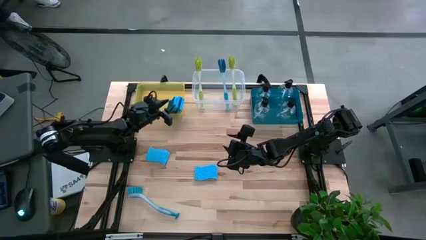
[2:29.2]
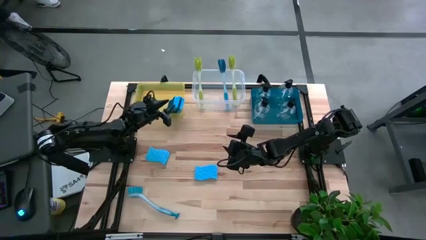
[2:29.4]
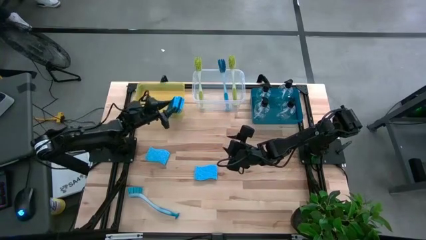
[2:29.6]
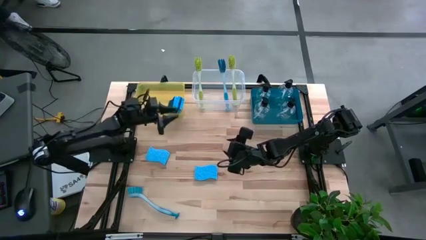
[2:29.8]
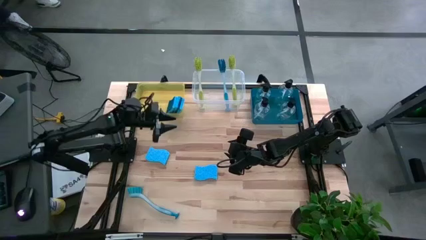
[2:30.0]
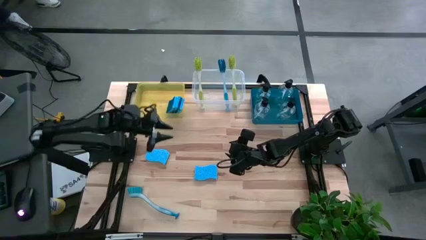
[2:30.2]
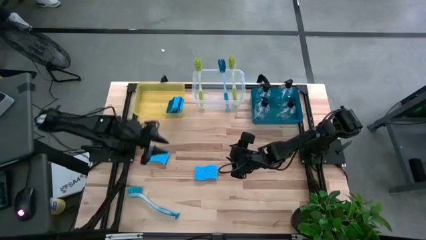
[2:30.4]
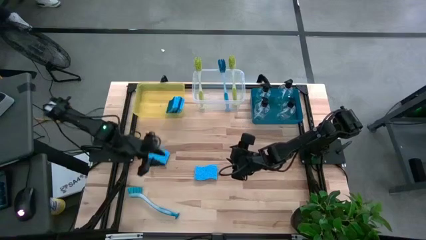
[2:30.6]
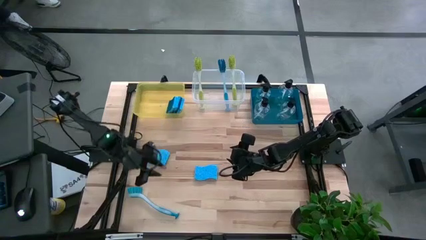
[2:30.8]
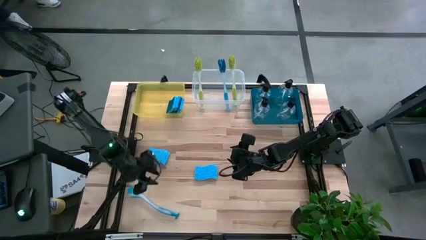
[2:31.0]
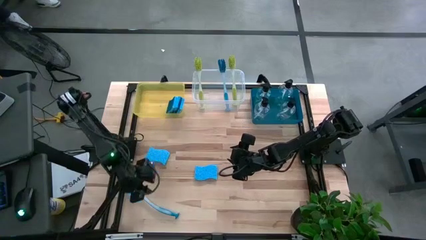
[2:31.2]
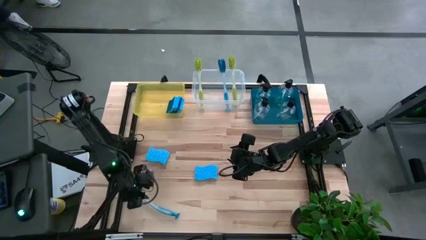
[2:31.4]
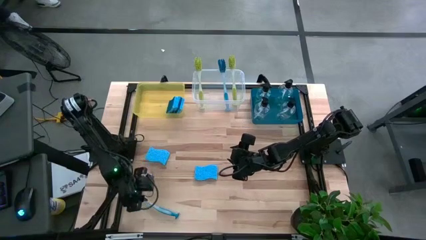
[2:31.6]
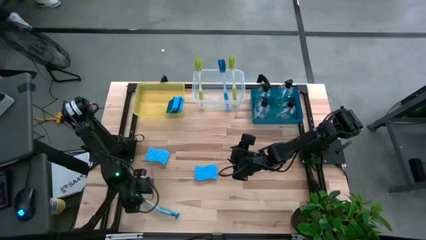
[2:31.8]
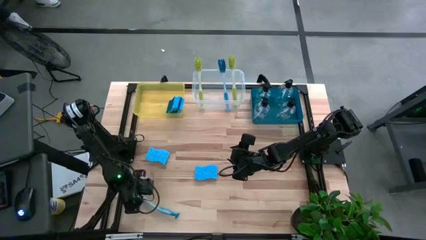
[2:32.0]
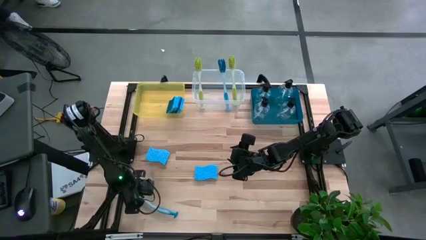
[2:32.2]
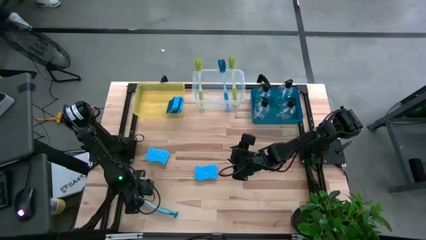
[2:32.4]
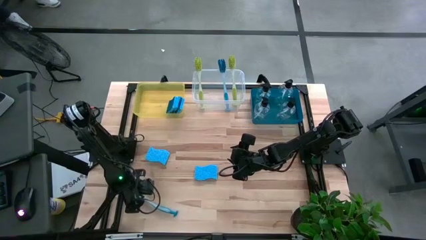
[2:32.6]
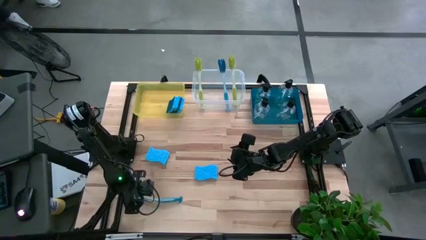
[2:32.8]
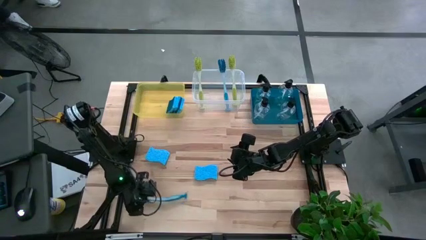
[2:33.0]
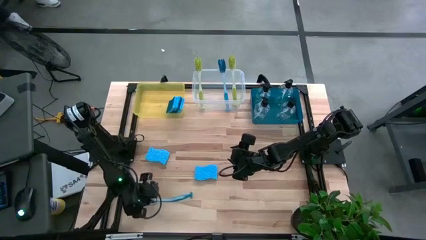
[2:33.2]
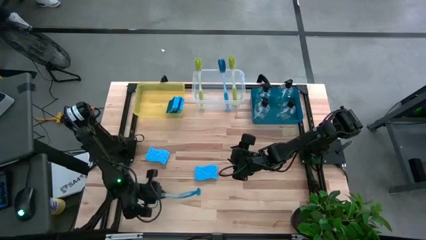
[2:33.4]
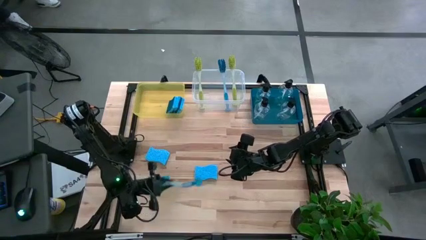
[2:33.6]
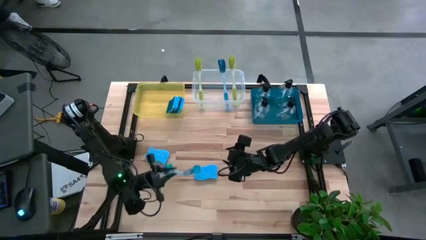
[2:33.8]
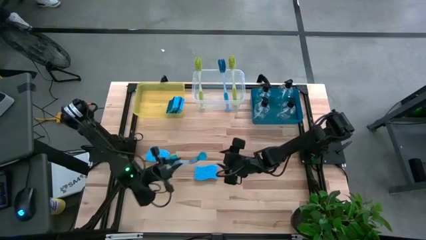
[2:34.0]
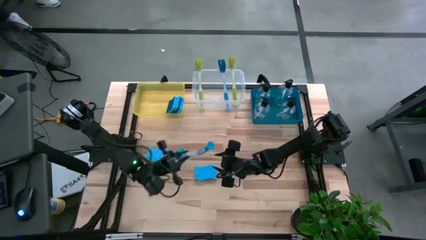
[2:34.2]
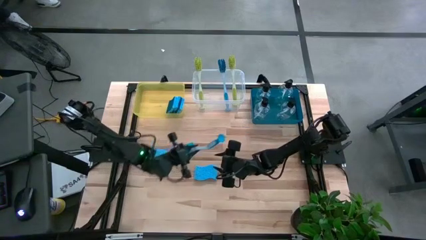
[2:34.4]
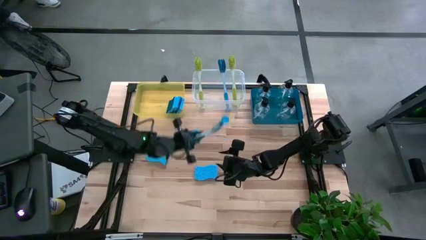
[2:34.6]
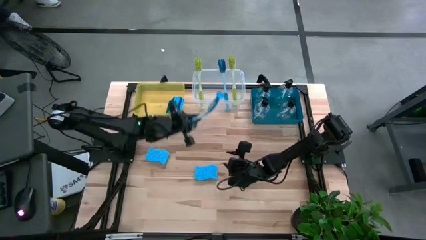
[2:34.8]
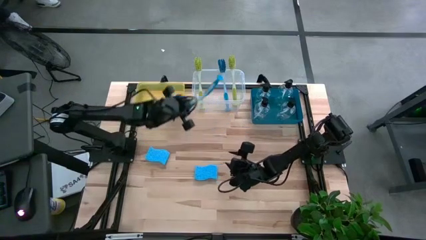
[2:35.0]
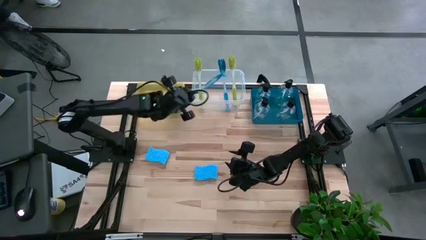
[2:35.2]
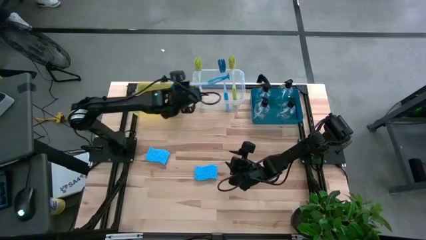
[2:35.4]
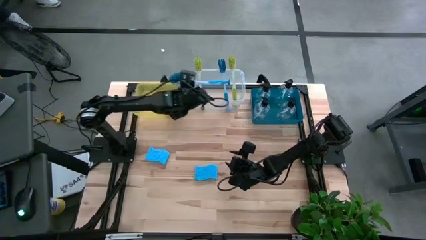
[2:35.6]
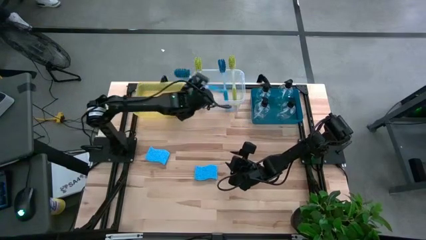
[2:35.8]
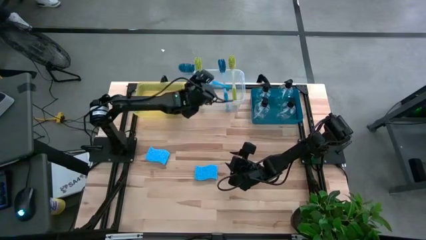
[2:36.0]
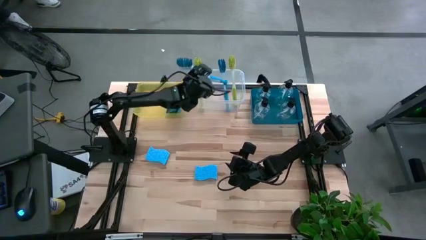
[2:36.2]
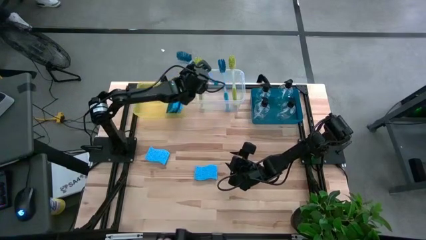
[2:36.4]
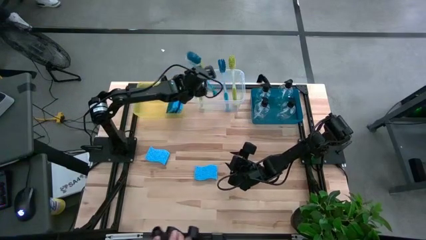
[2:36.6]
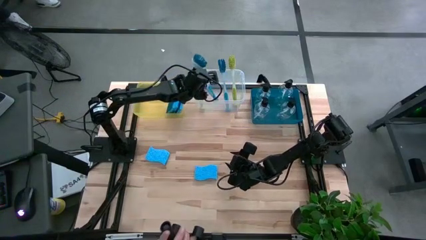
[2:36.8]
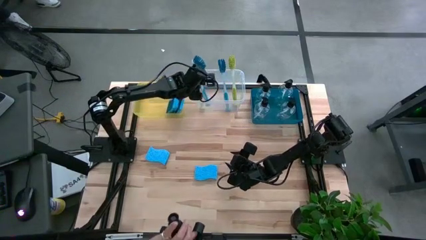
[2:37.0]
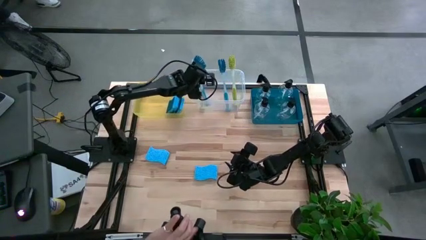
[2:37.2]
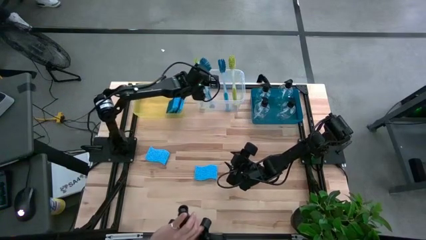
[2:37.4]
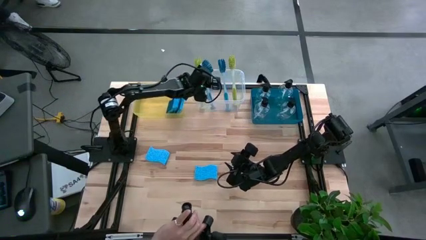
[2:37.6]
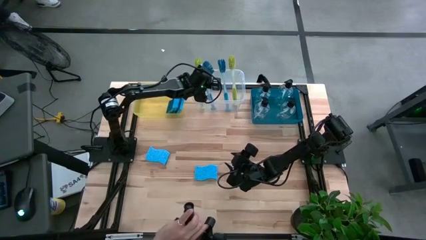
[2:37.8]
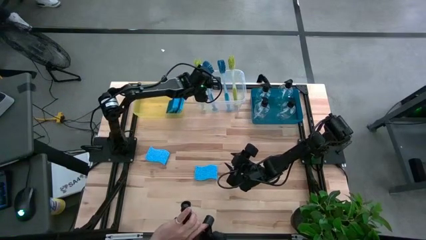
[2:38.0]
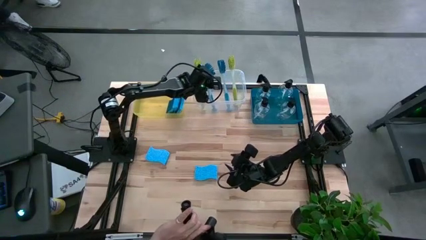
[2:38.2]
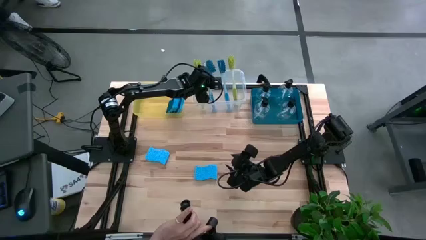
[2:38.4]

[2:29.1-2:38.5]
Task: Pick & Place Kitchen Sink Supplies
Put the blue dish brush into the transparent container

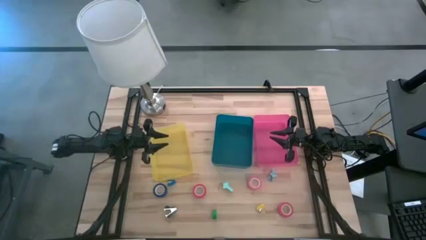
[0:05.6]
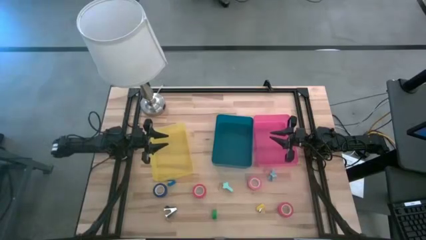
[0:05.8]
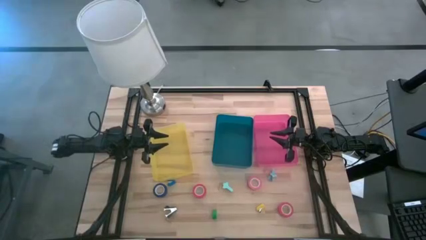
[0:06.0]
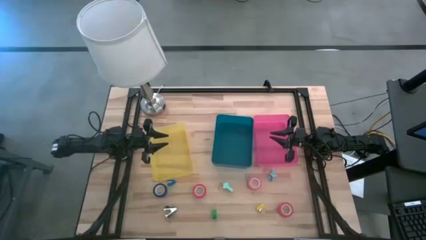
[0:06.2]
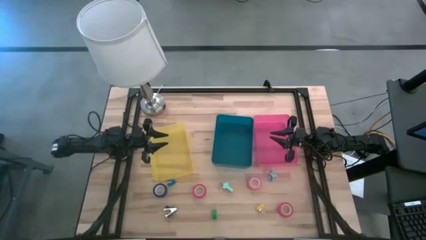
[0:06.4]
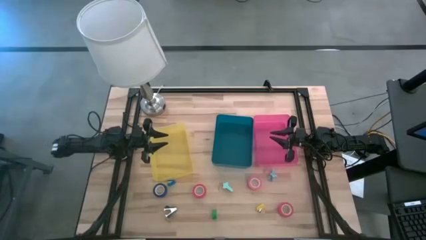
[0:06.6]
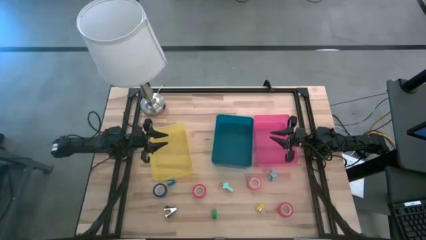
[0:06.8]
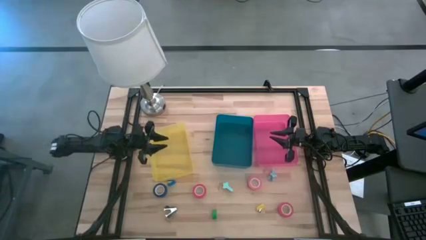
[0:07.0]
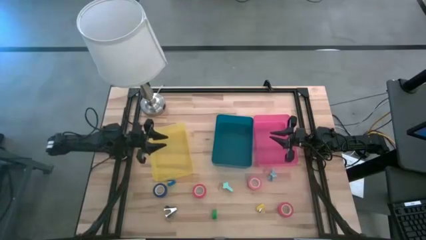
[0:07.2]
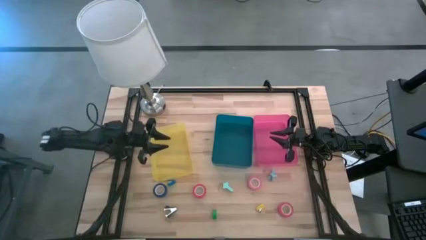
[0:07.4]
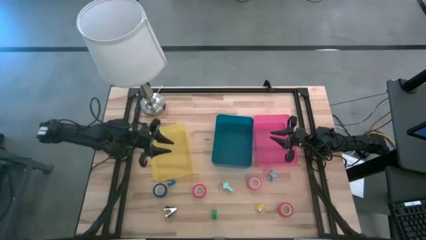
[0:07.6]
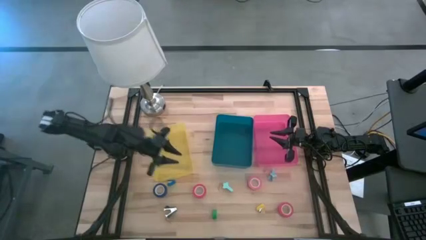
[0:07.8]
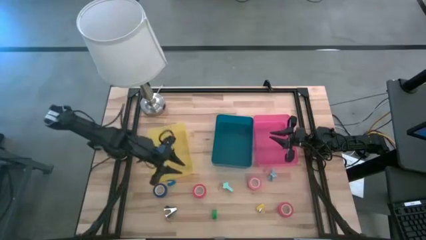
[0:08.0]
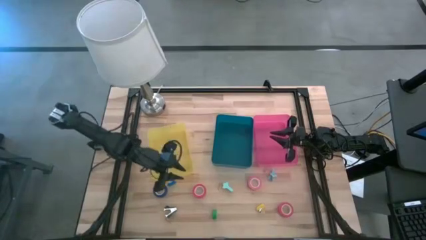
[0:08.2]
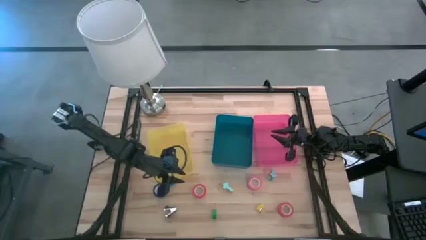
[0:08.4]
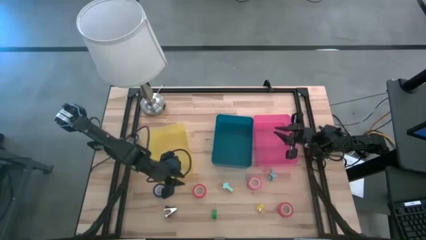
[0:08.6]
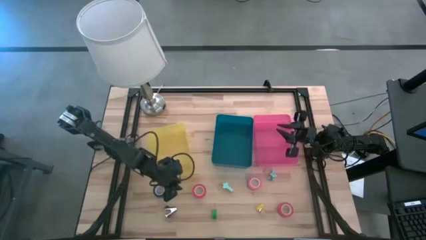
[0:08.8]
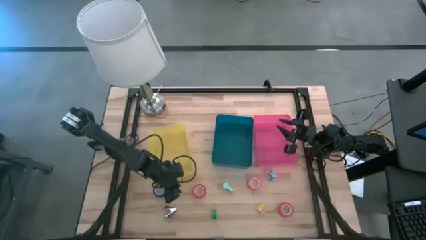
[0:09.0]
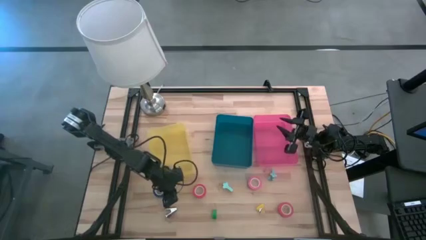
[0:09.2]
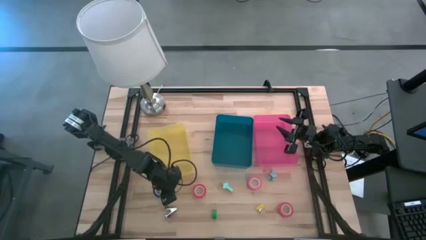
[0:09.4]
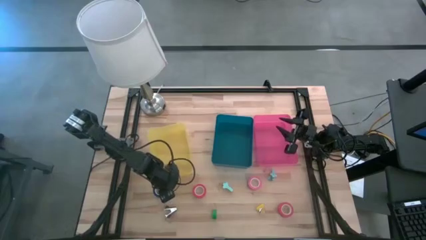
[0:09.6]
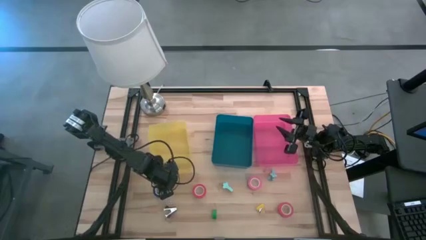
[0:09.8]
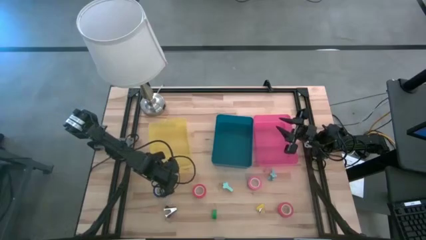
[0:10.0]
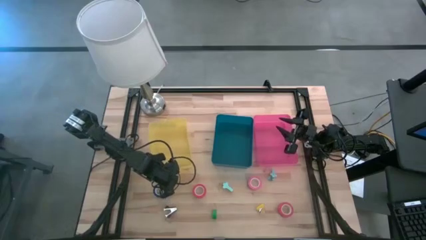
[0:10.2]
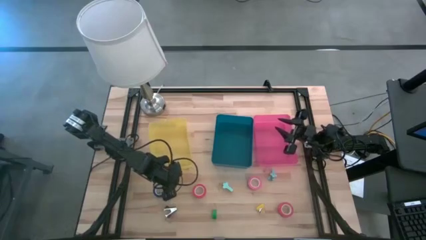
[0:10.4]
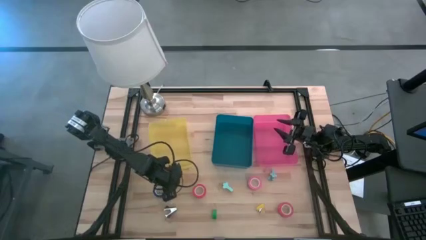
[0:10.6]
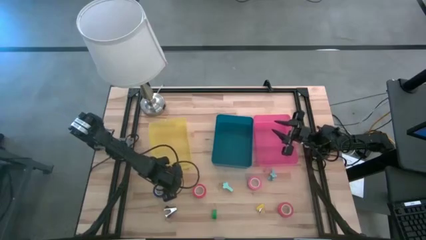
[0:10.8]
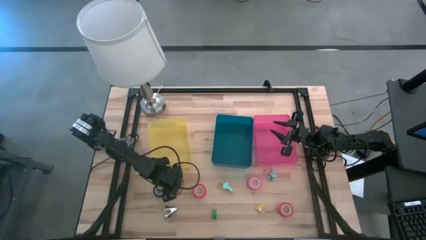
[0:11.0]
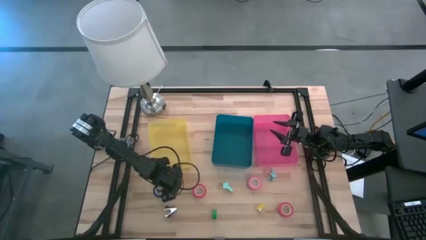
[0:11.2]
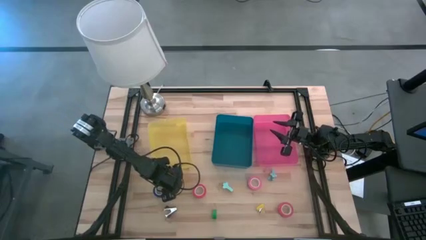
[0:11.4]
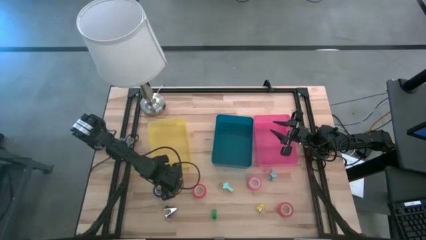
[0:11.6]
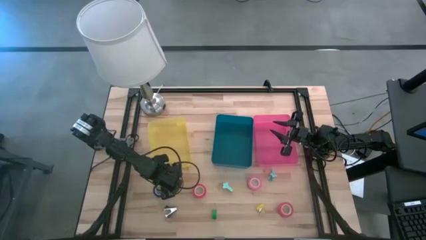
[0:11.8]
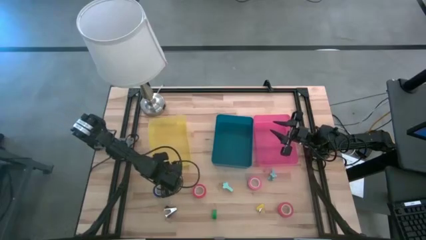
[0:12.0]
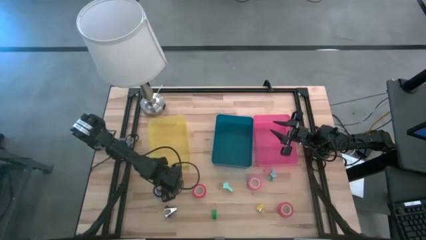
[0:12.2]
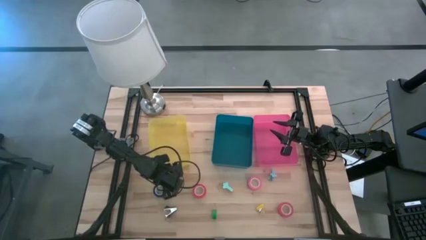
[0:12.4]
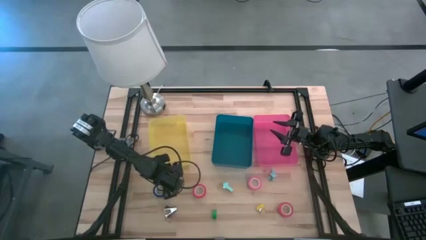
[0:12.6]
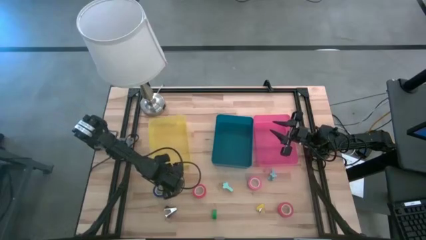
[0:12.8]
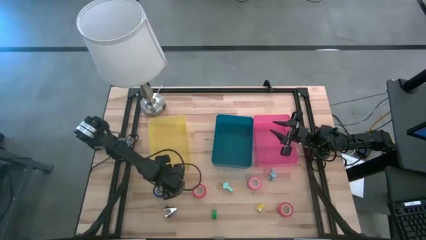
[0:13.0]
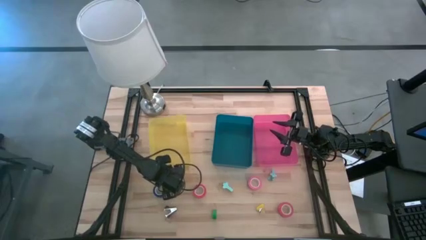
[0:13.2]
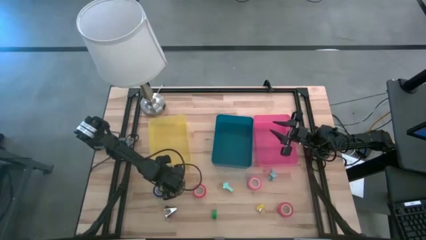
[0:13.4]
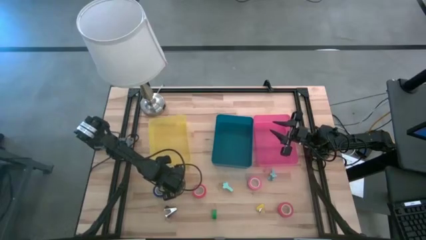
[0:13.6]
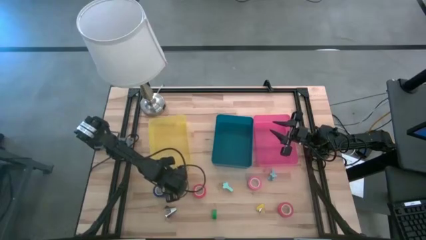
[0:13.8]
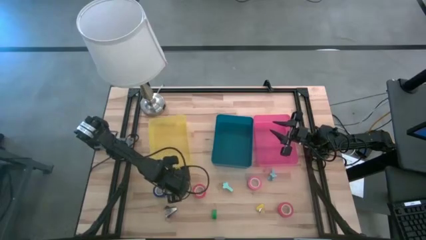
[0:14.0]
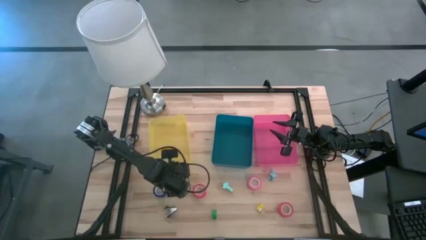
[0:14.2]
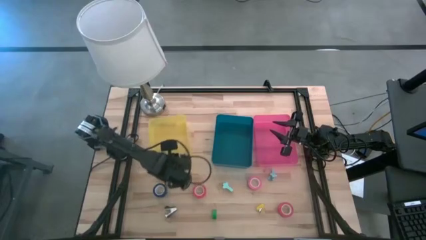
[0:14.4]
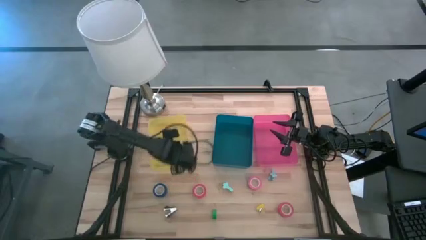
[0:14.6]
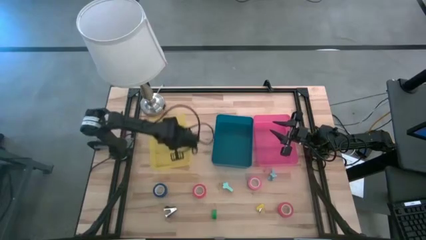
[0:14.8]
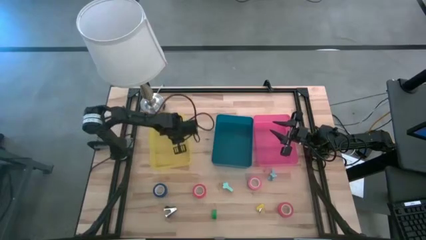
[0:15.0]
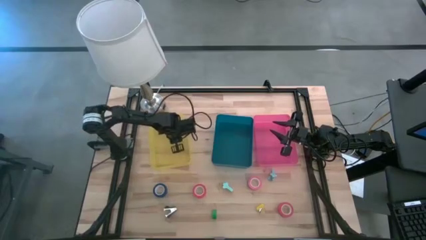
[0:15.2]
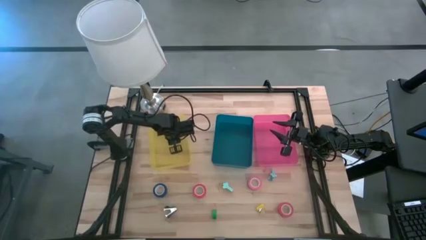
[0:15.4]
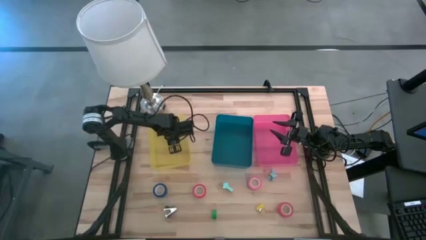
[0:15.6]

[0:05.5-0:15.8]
Task: Pick and place Stapler, Stapler remover, tape
Put the blue stapler into the yellow bin
